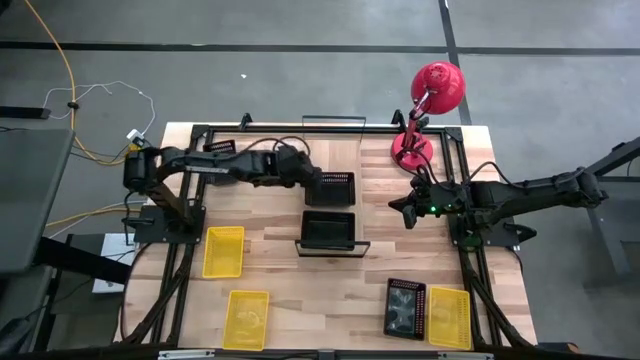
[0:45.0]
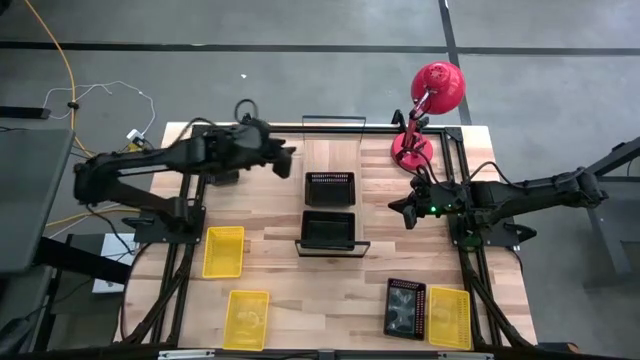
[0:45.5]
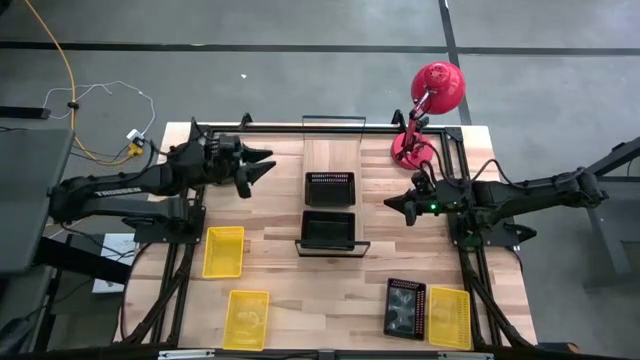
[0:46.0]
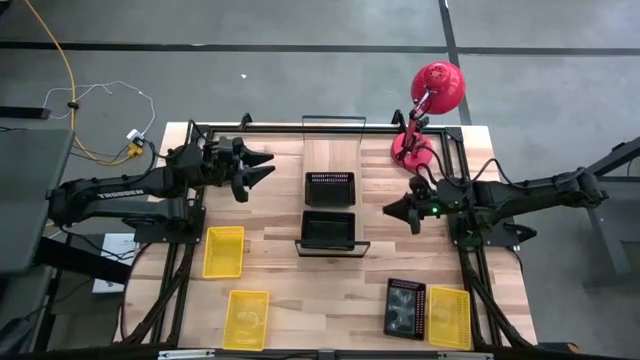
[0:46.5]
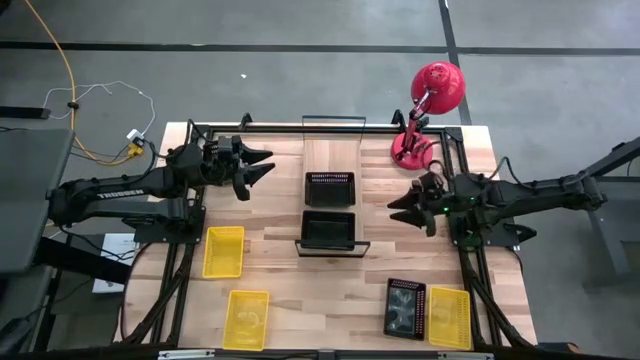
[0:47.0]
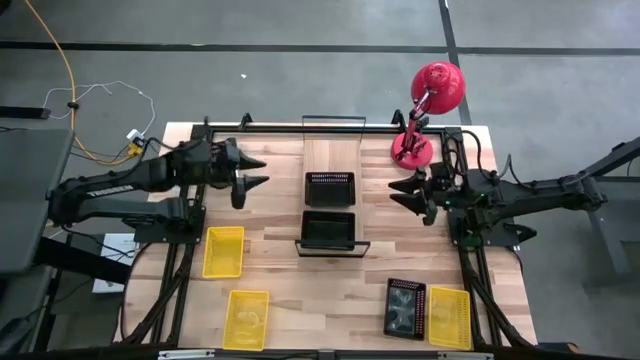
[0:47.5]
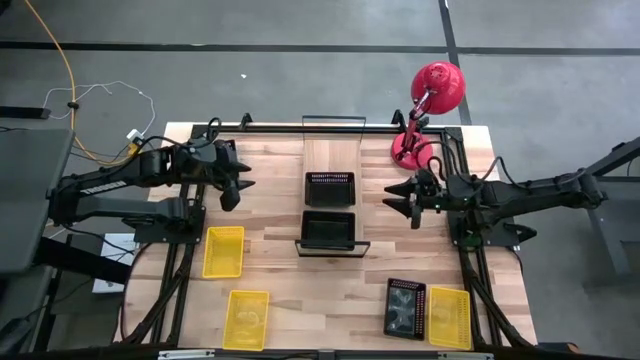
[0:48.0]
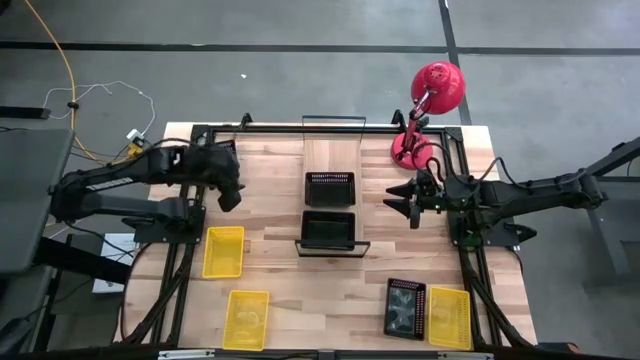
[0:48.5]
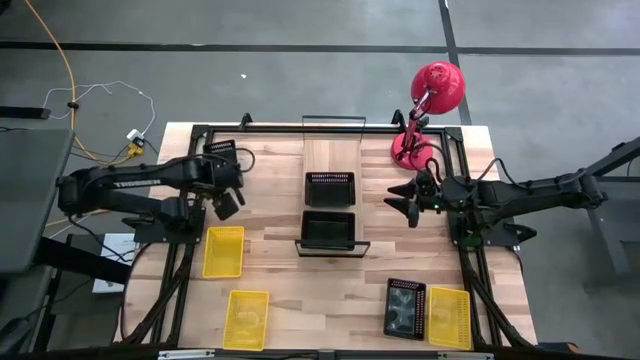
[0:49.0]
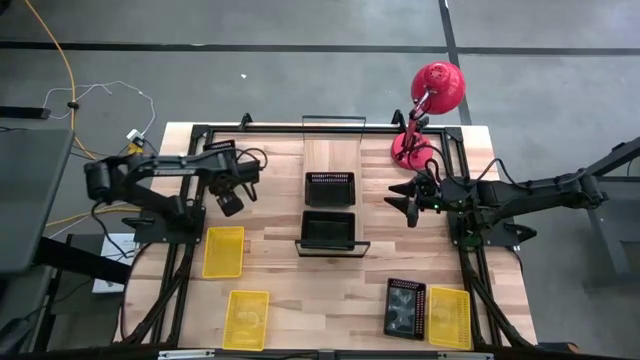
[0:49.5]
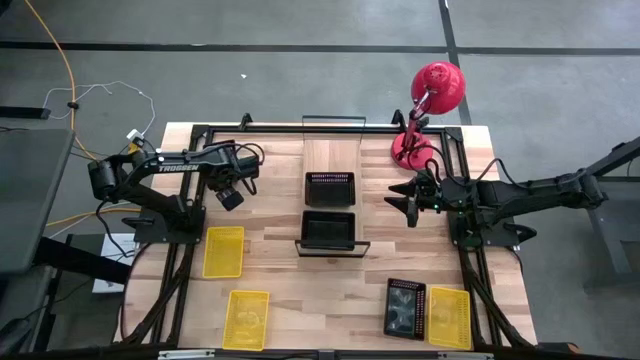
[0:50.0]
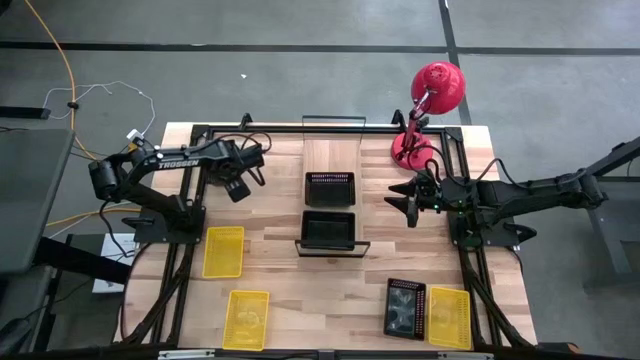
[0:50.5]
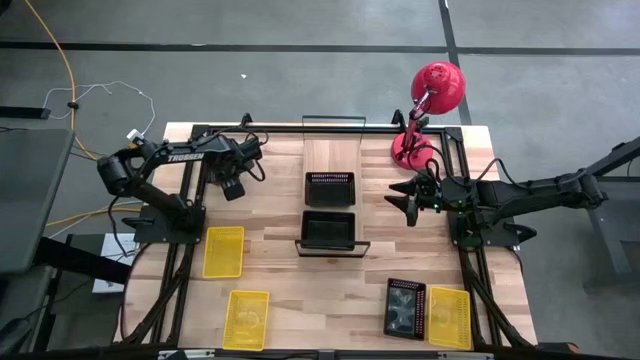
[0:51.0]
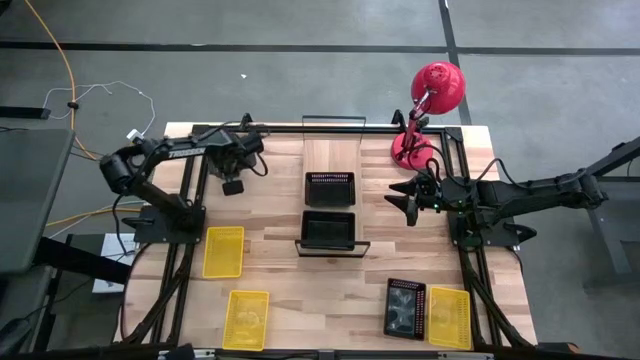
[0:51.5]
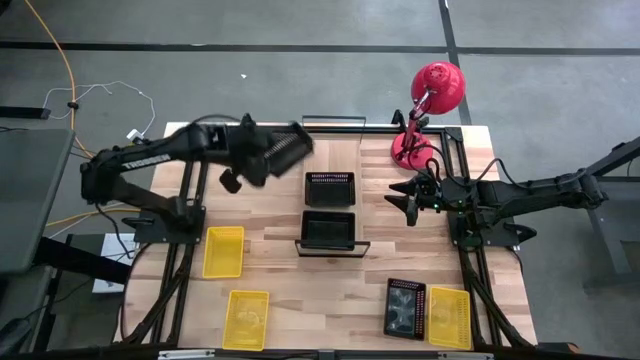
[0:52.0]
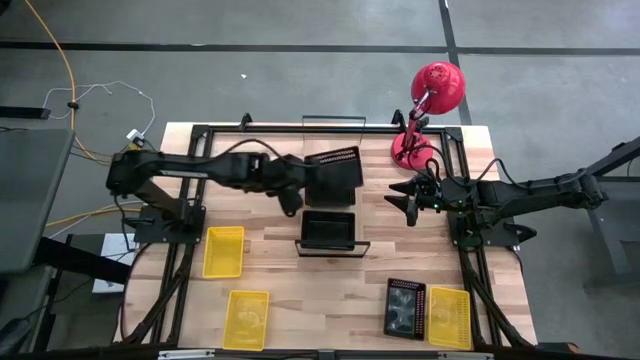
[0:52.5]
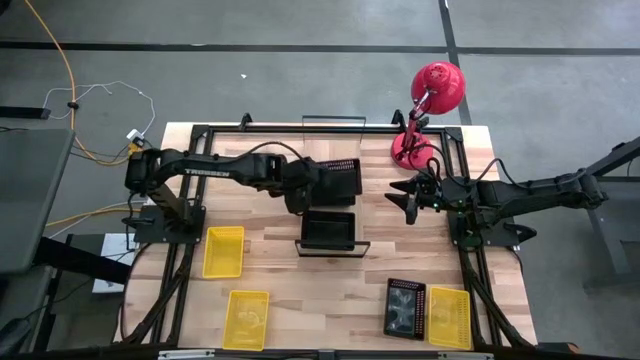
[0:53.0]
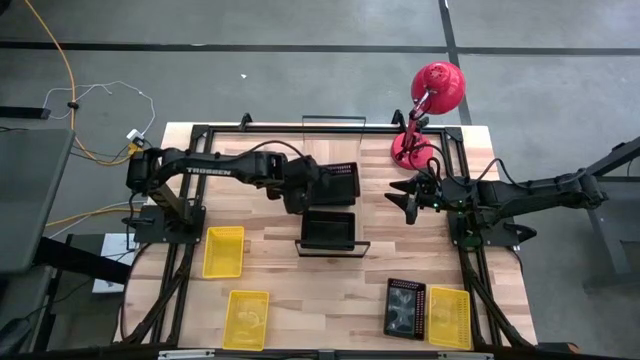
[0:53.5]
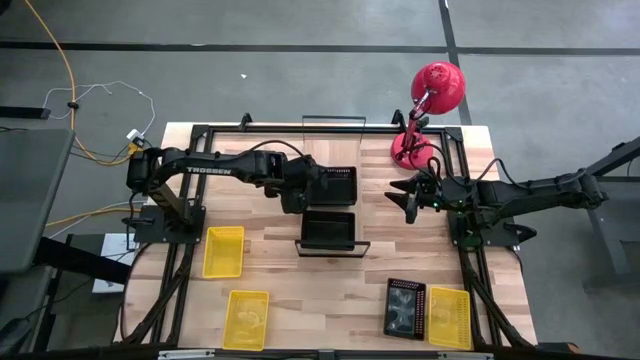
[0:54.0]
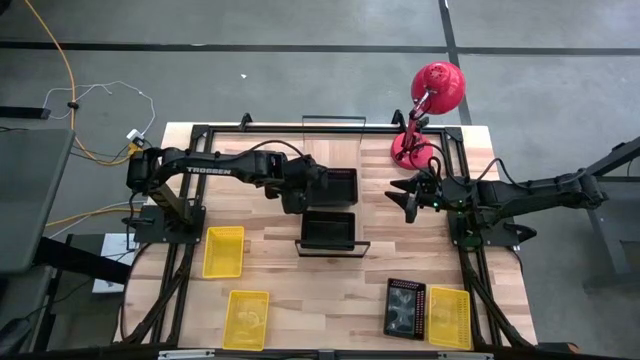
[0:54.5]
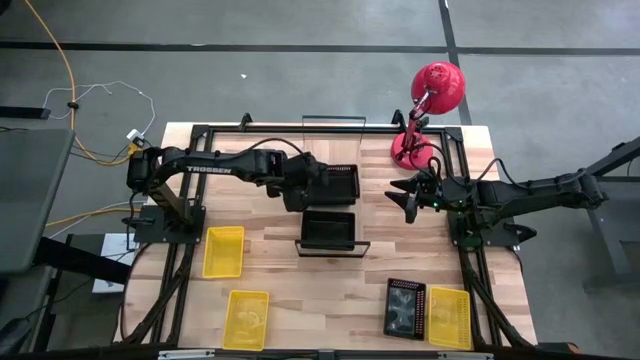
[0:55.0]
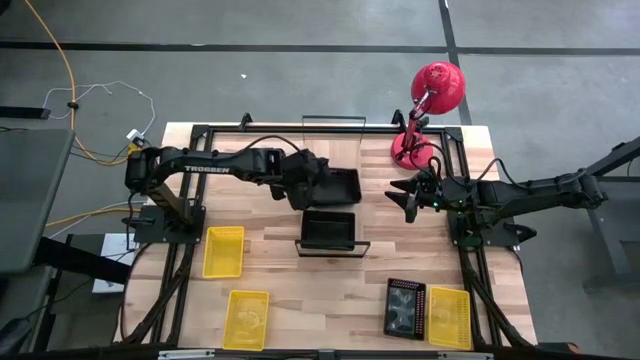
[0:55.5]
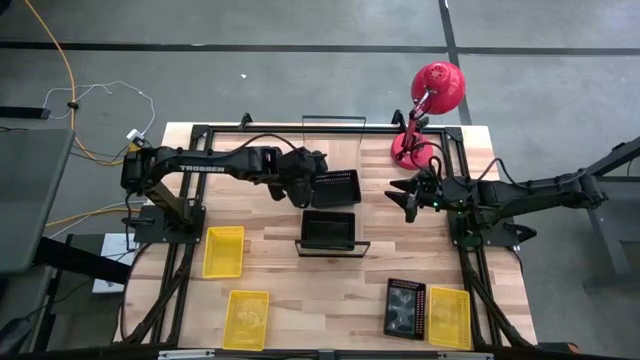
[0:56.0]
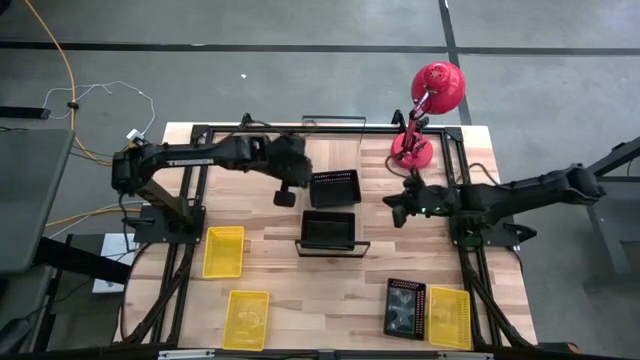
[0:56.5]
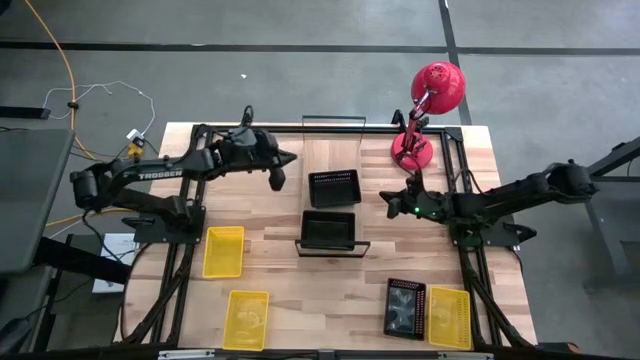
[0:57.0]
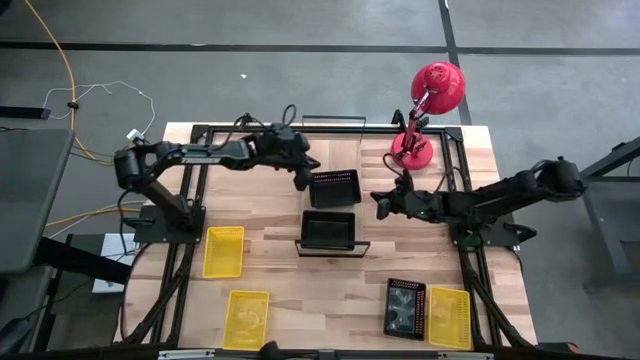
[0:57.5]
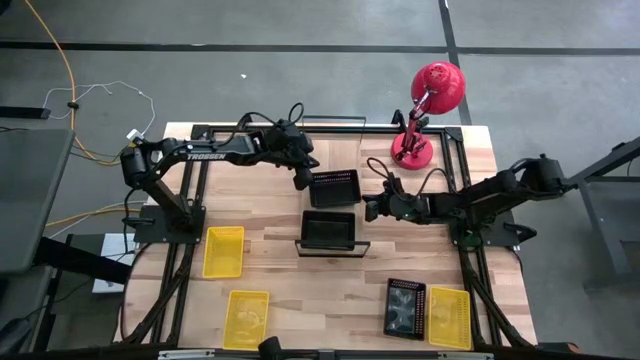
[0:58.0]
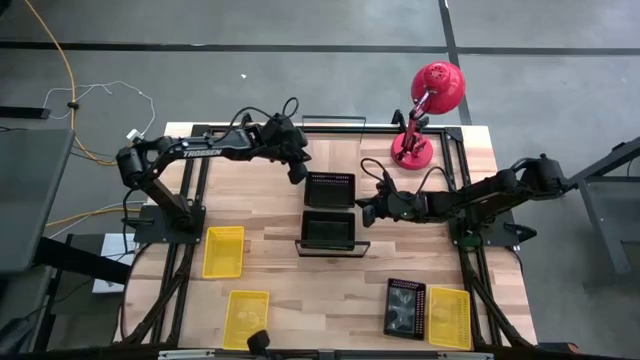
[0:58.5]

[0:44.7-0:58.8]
Task: Stack baskets on shelf by color
Stack the black bin on top of the black bin on the shelf

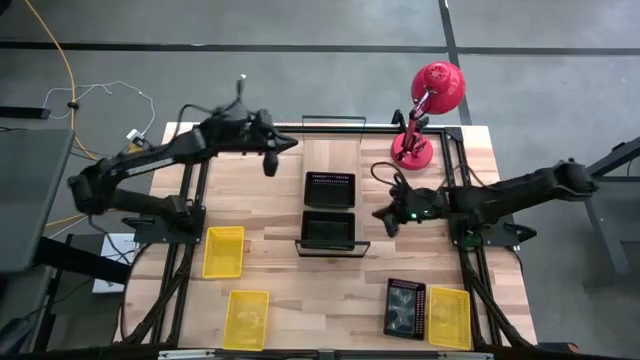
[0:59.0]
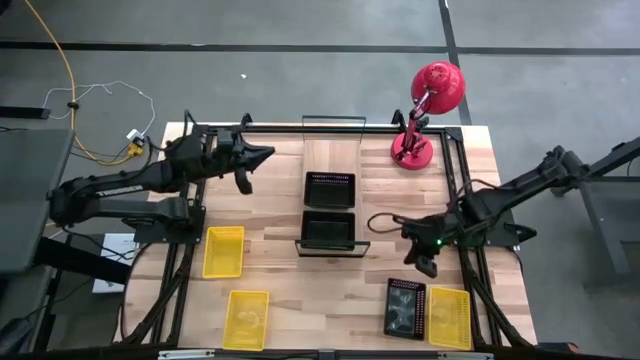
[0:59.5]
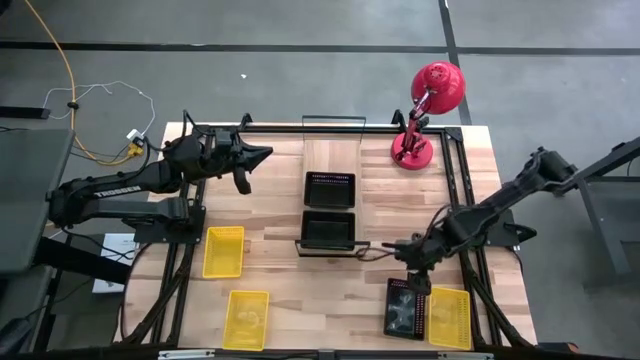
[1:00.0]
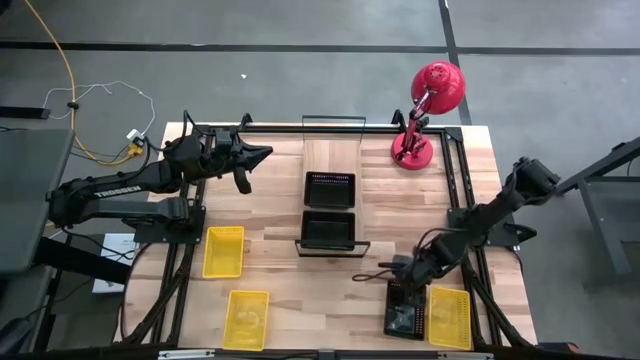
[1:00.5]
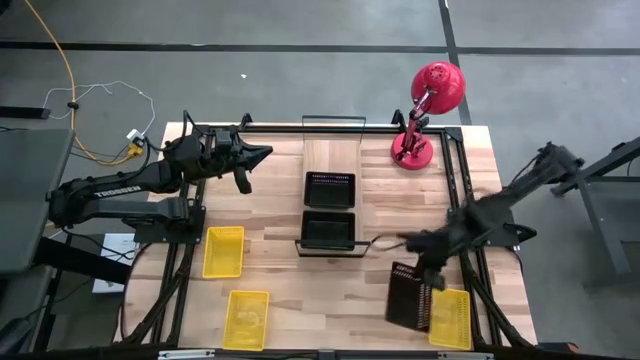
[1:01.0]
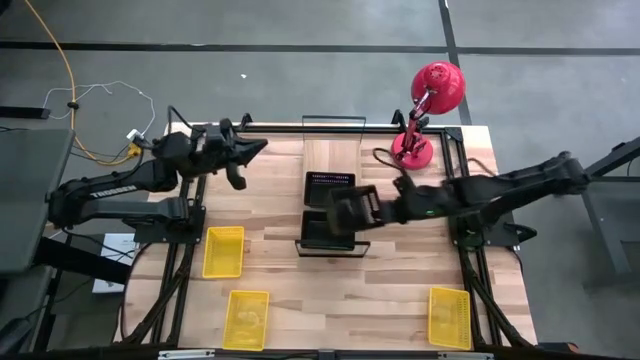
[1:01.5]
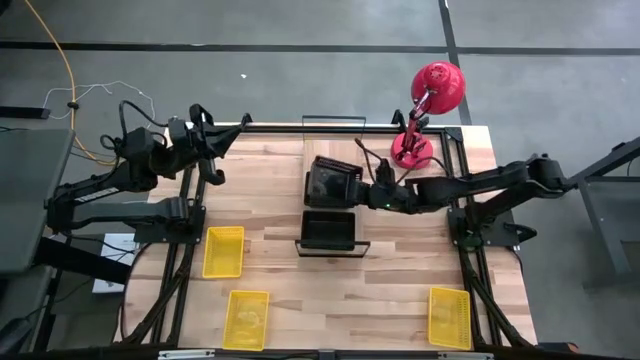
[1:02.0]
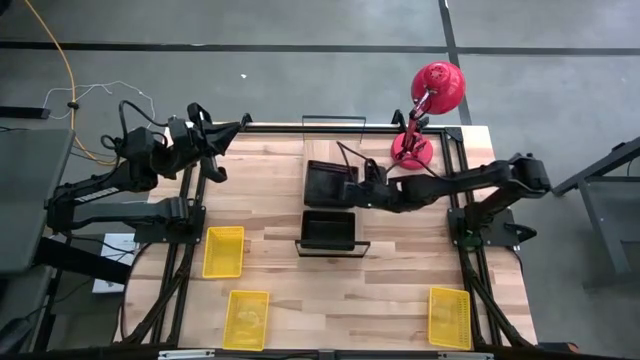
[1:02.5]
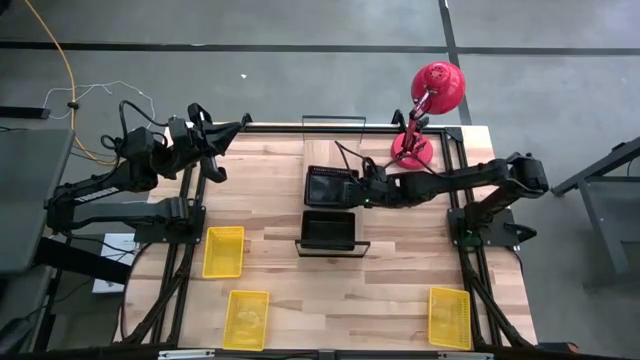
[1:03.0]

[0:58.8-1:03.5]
Stack the black bin on top of the black bins on the shelf

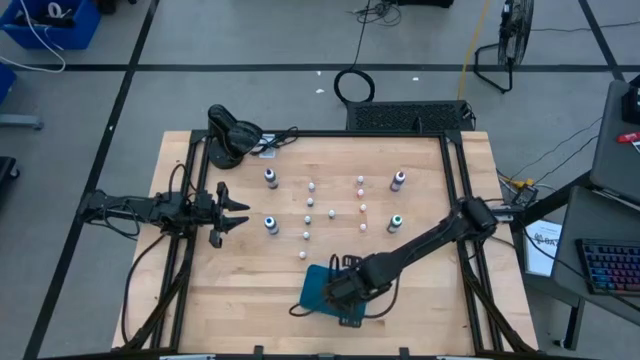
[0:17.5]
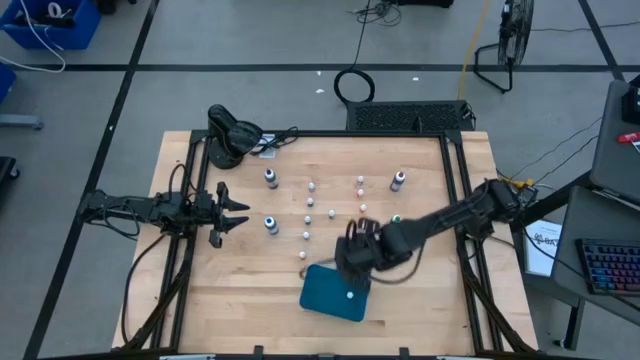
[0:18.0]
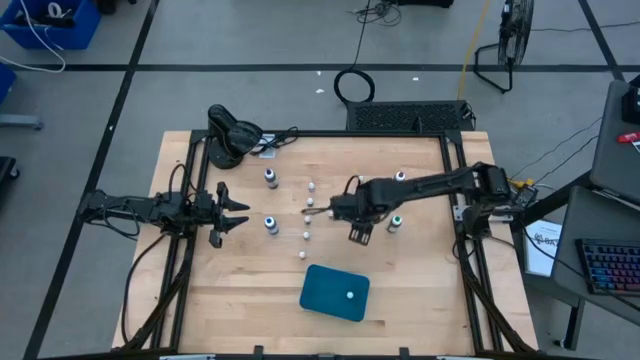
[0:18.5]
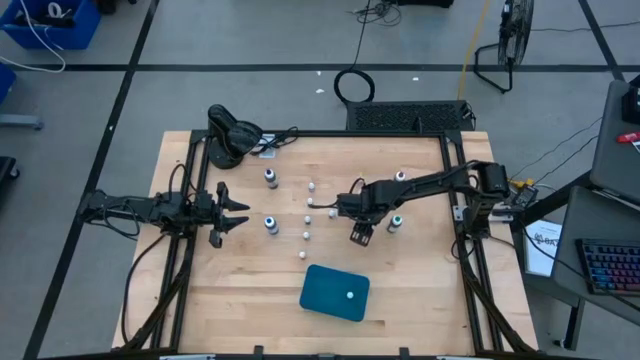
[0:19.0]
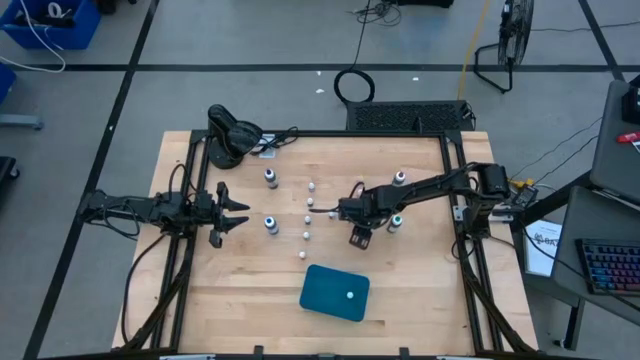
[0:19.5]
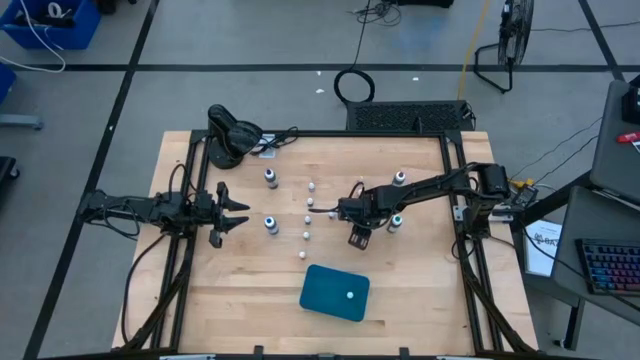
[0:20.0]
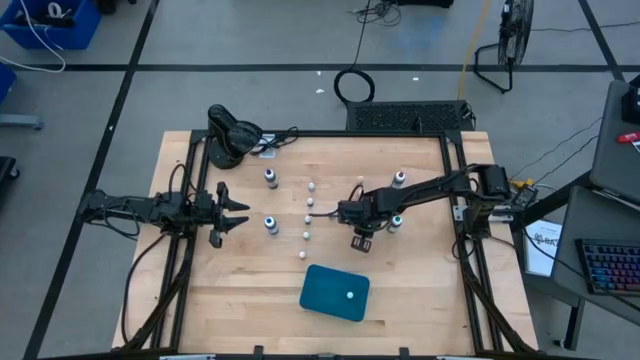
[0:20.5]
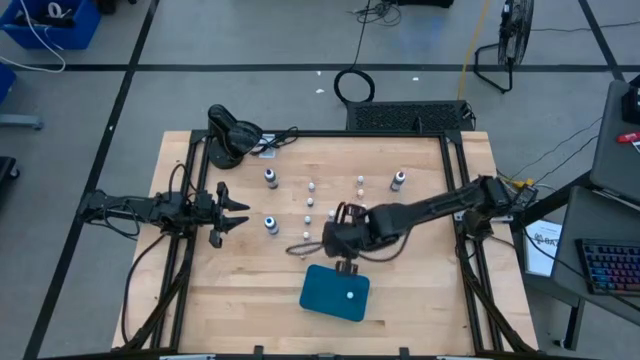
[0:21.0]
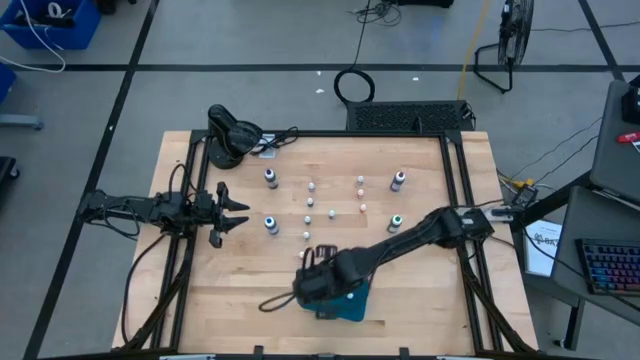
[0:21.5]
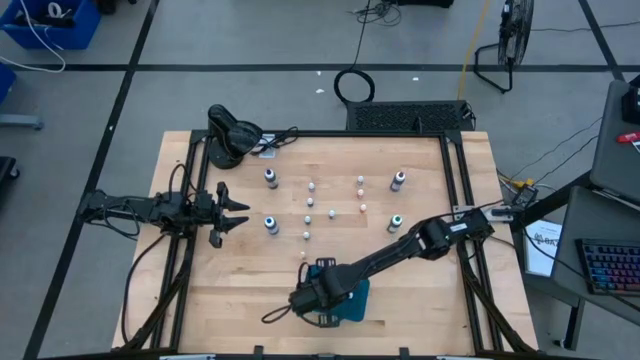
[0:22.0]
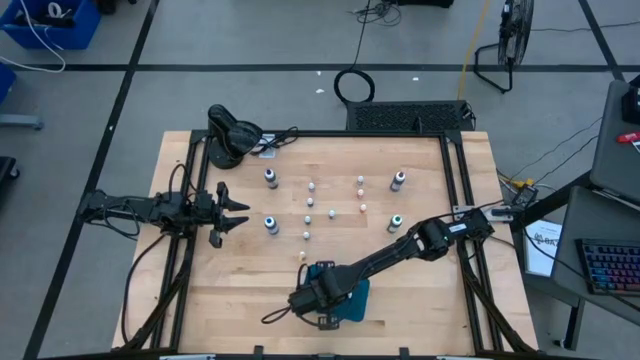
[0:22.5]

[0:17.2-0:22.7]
Task: Pick & Place food coloring
Put the small yellow coloring bottle into the blue bin
